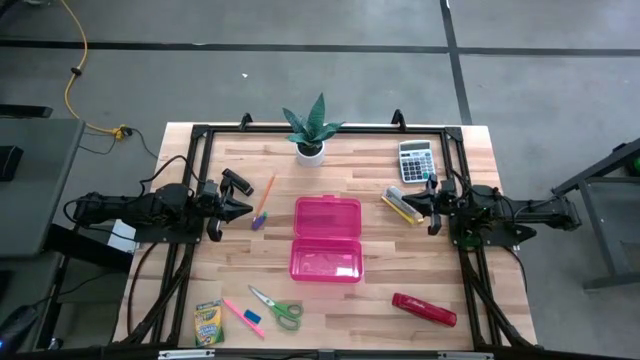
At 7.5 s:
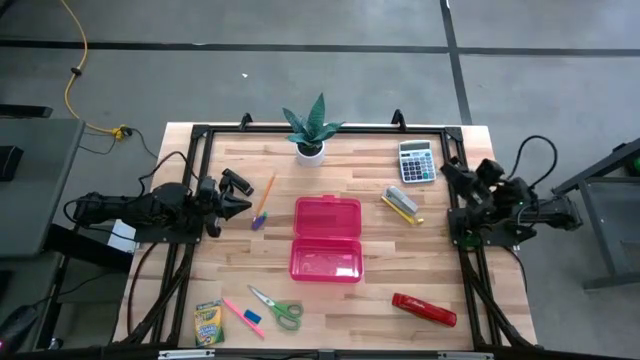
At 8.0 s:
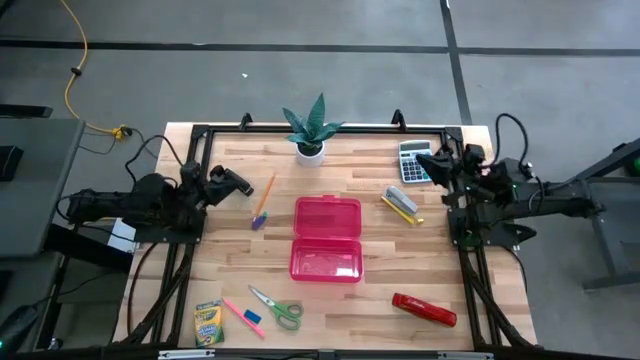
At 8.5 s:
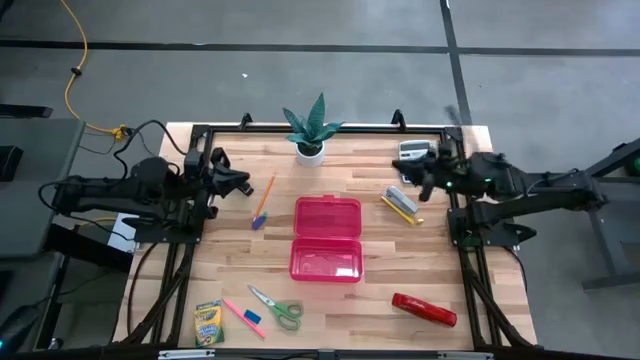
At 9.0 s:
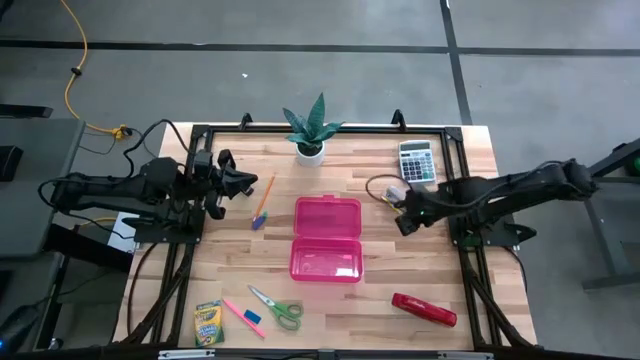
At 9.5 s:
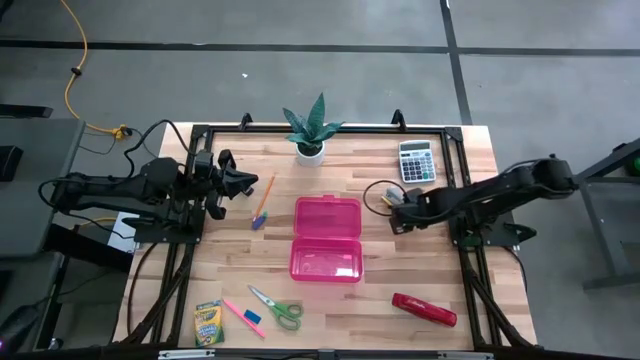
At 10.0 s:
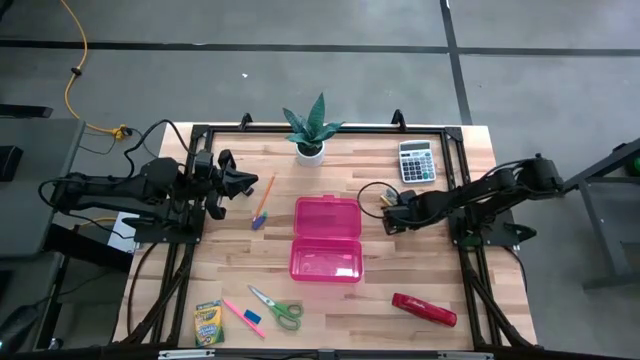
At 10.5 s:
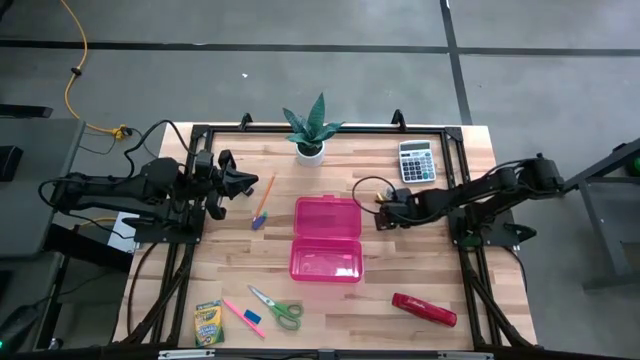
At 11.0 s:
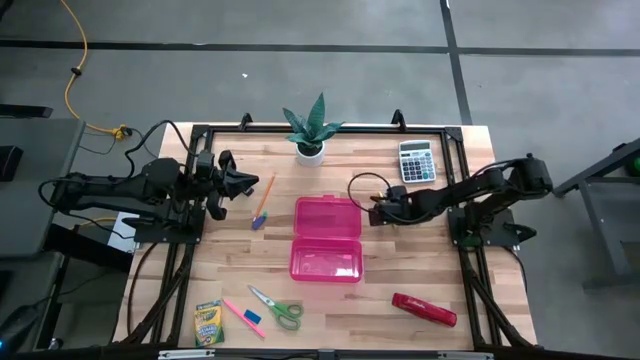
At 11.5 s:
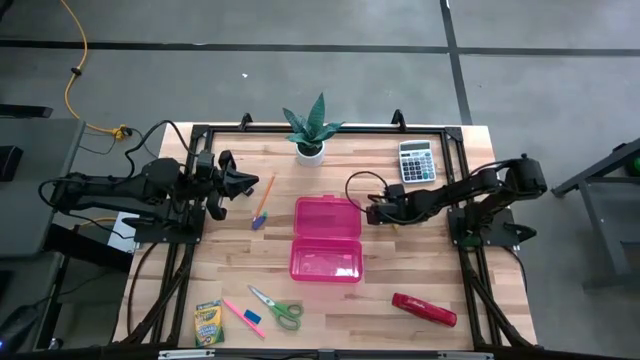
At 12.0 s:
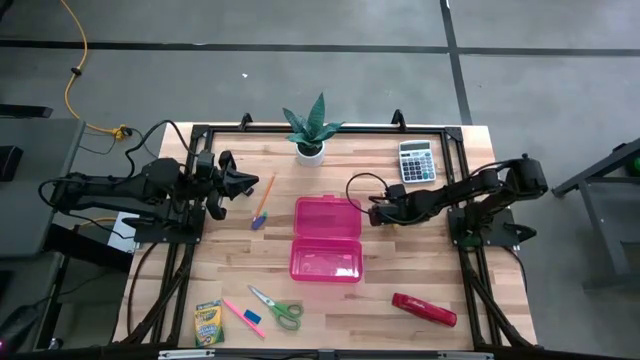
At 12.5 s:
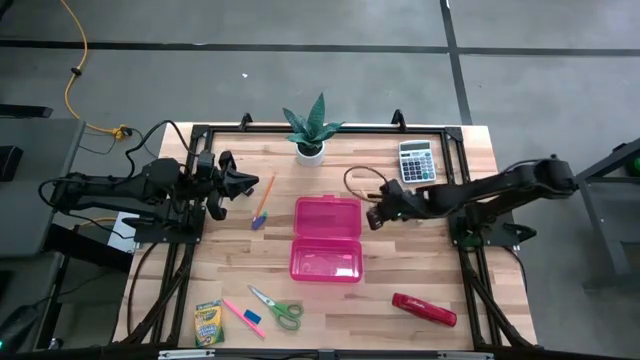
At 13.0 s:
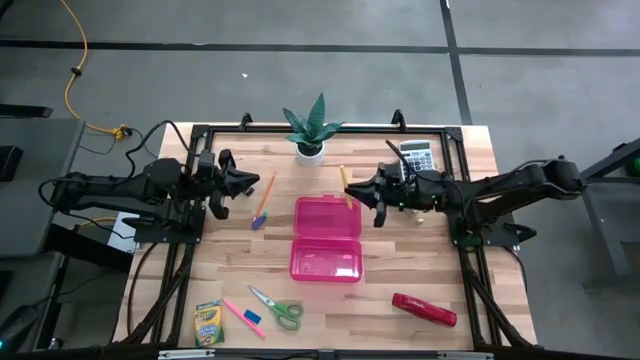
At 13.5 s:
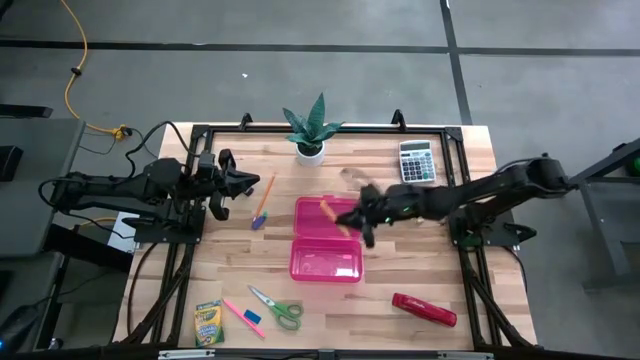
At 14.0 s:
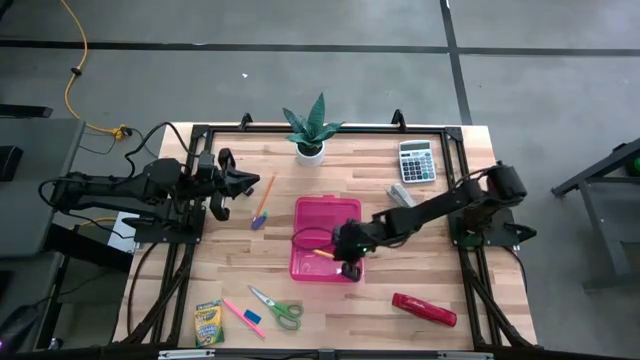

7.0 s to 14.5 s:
Task: Pack school essentials
Put the yellow pen into the red supply box

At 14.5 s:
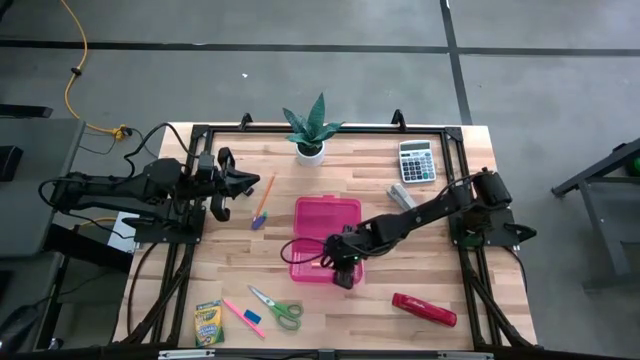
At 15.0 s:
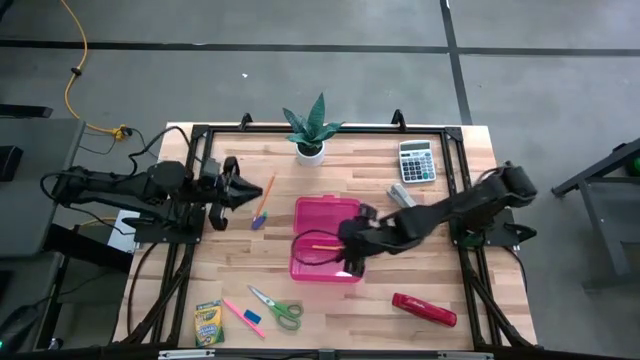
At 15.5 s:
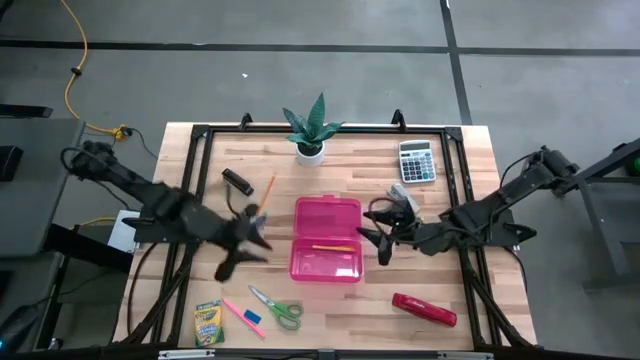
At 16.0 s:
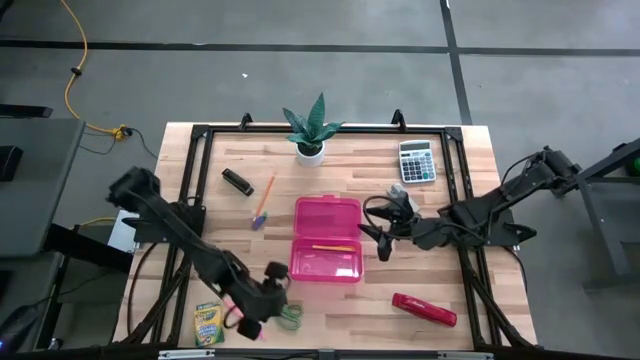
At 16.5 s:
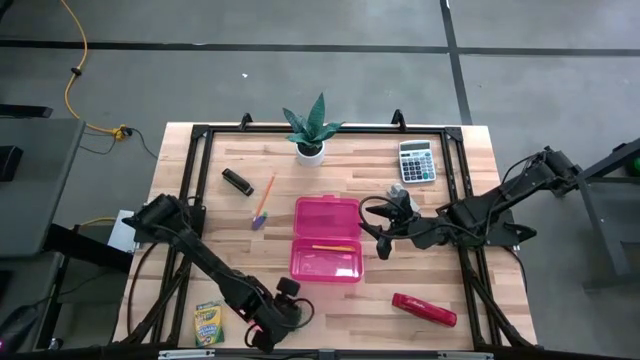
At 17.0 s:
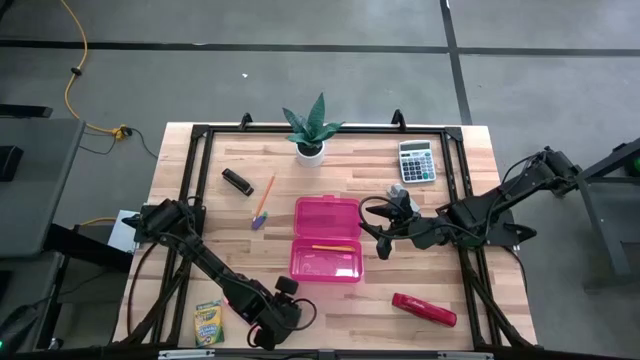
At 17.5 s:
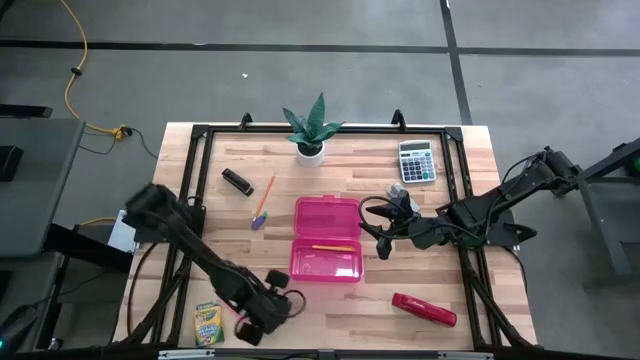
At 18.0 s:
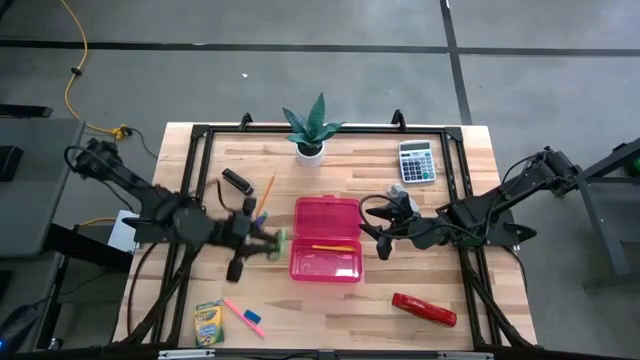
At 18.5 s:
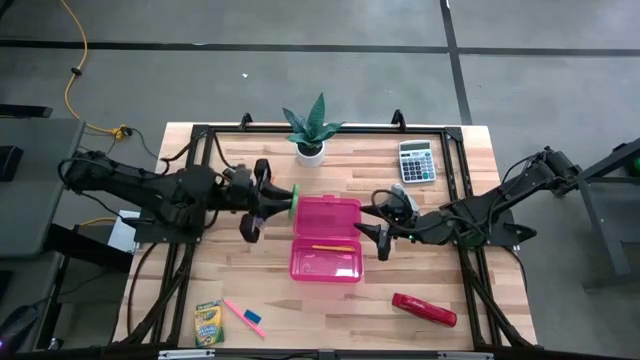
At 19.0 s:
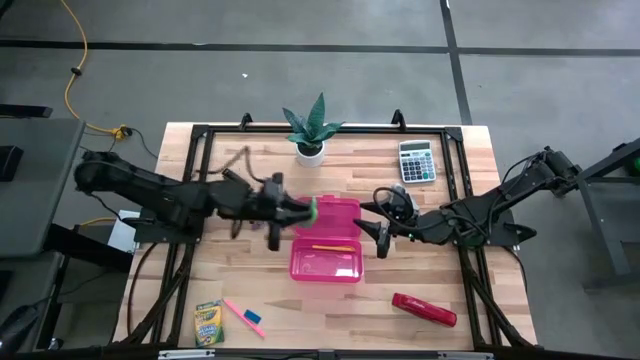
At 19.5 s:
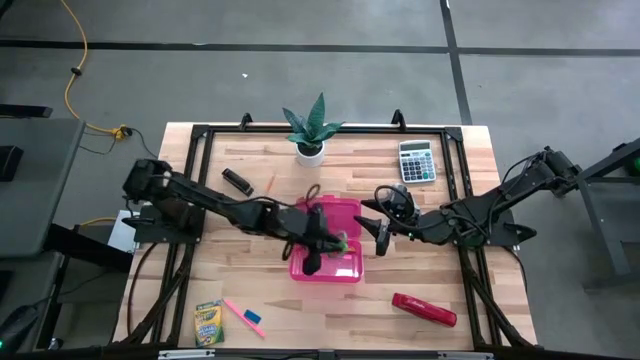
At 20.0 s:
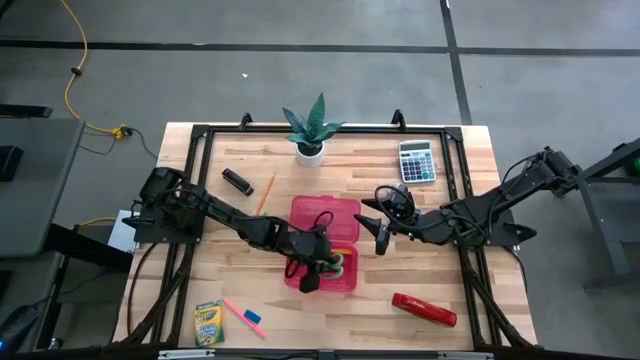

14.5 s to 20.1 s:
Put the green scissors into the red supply box

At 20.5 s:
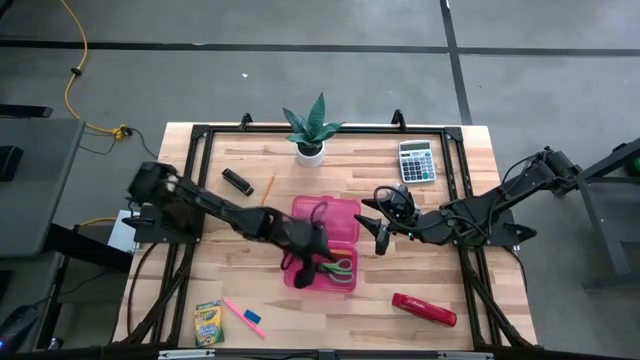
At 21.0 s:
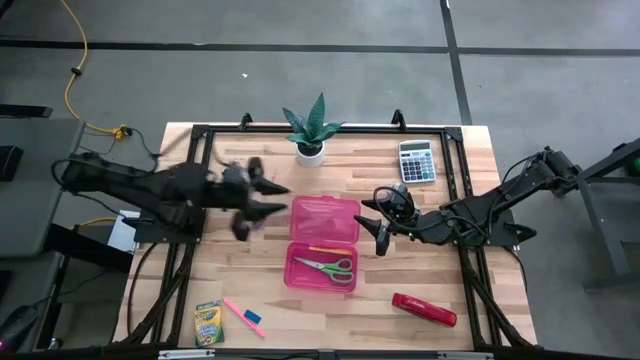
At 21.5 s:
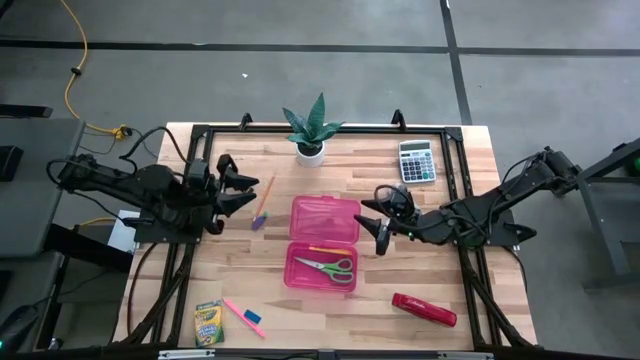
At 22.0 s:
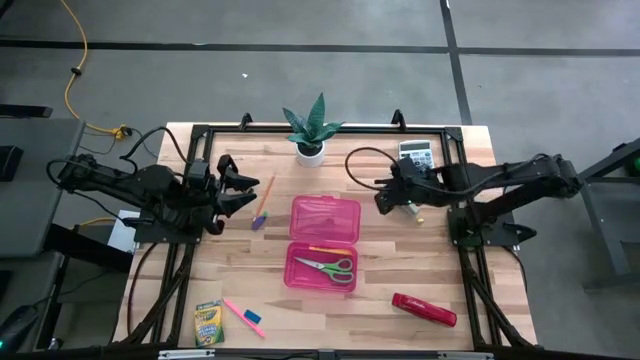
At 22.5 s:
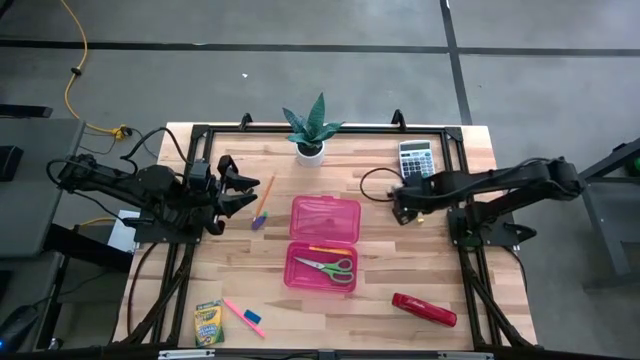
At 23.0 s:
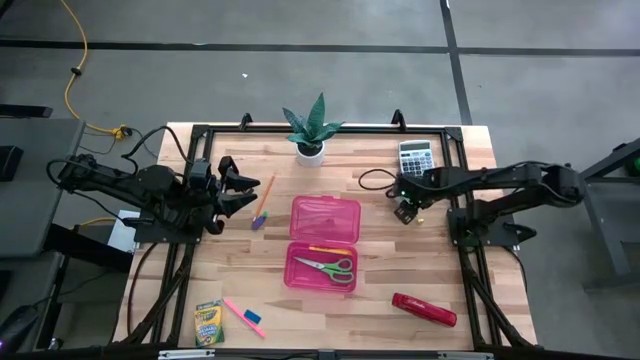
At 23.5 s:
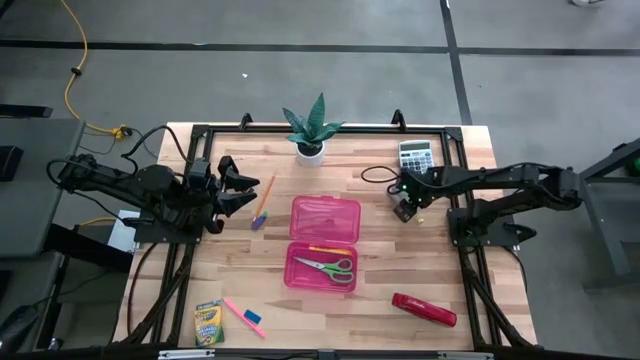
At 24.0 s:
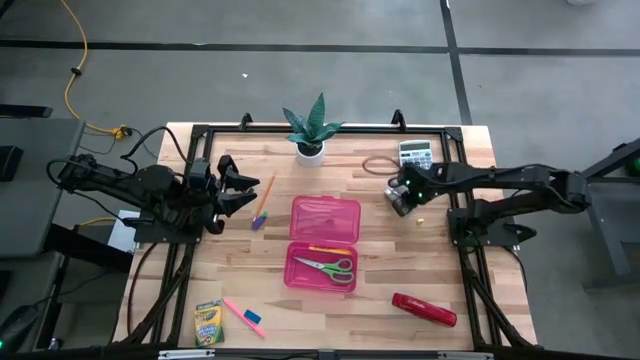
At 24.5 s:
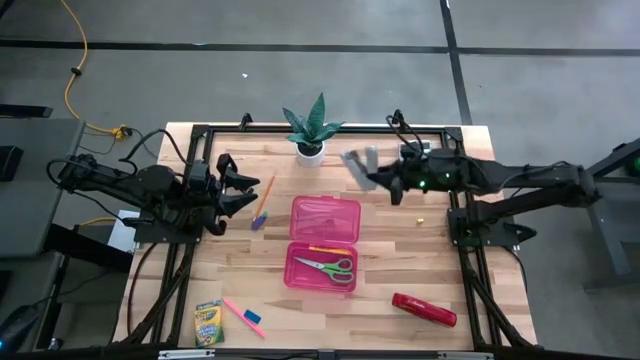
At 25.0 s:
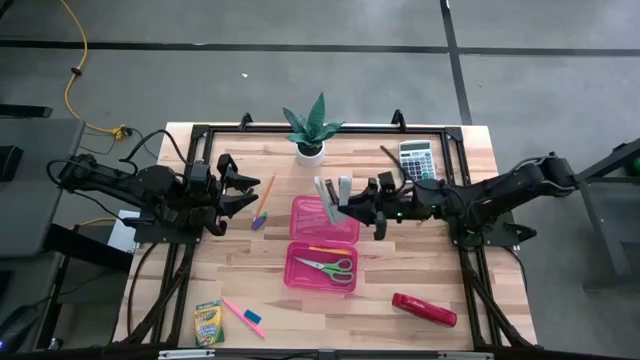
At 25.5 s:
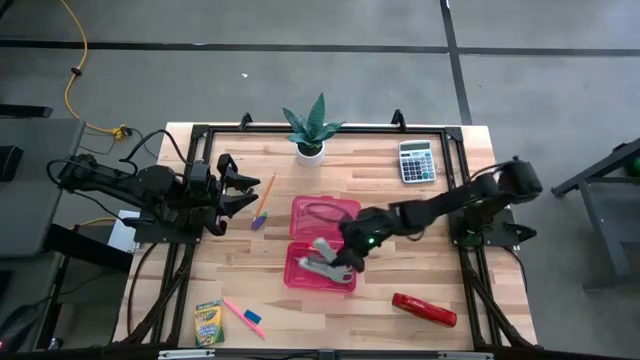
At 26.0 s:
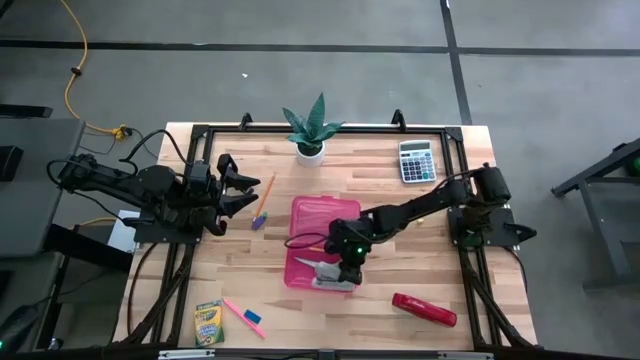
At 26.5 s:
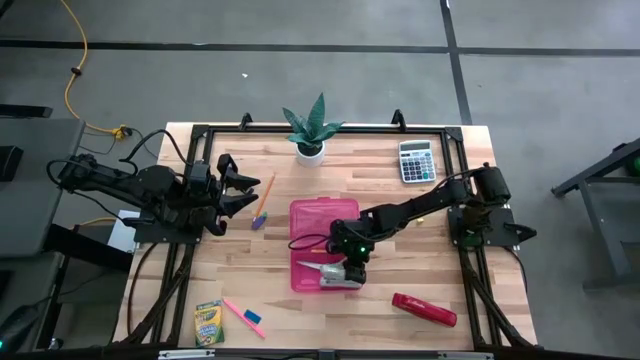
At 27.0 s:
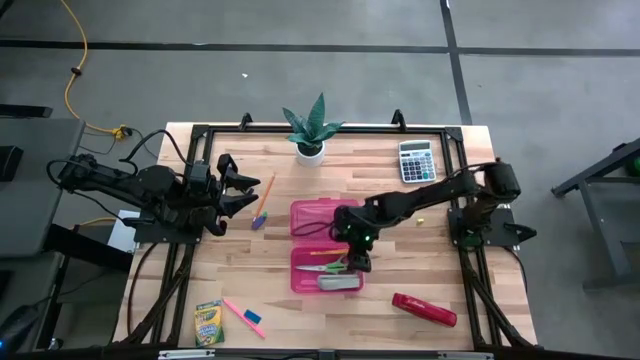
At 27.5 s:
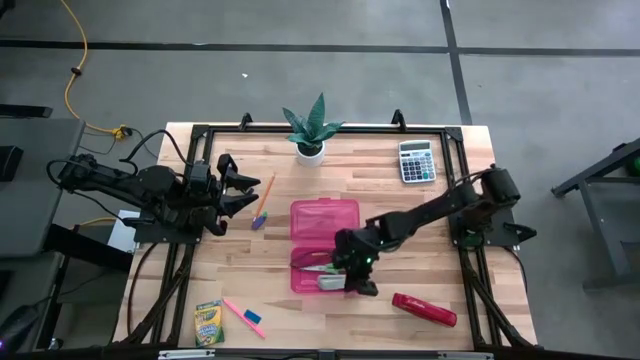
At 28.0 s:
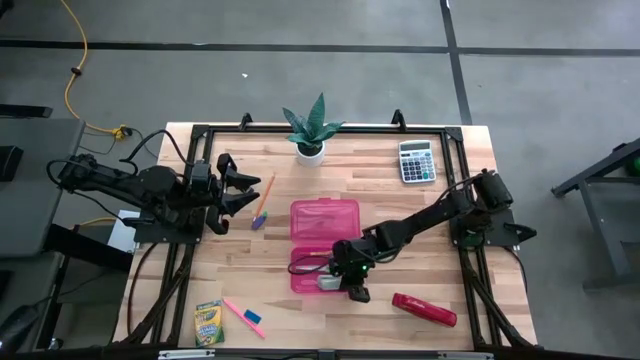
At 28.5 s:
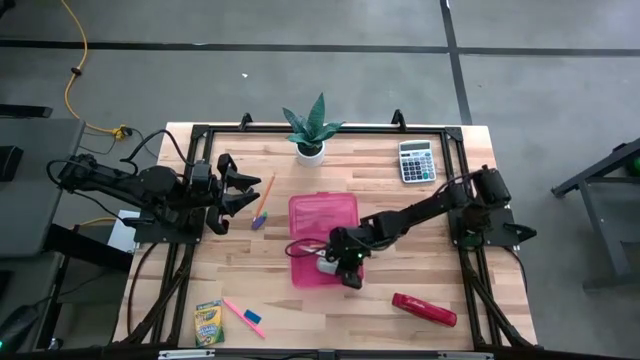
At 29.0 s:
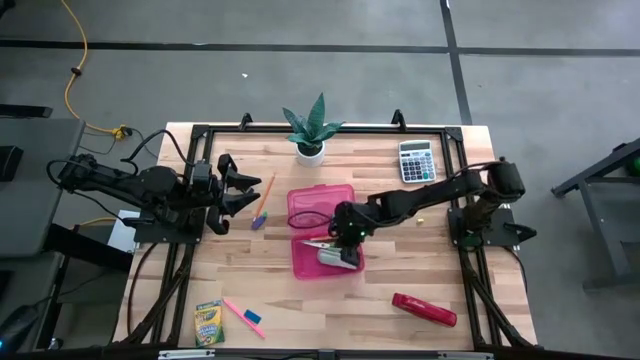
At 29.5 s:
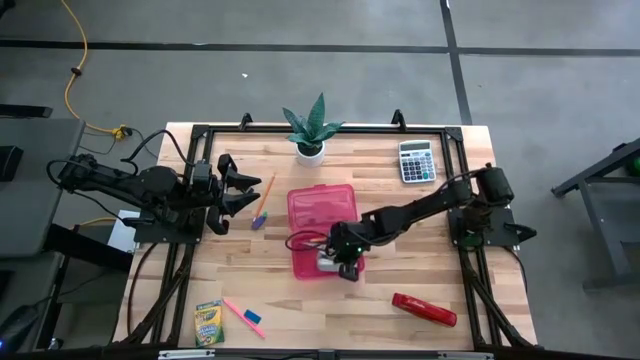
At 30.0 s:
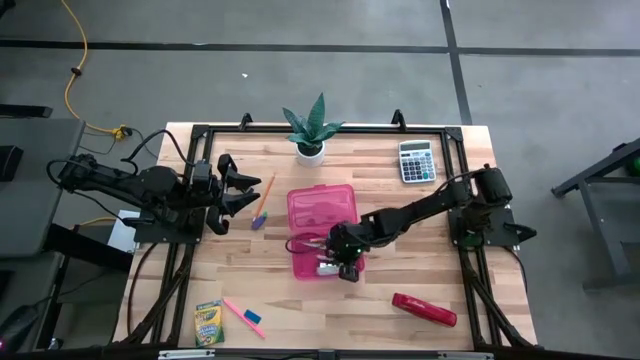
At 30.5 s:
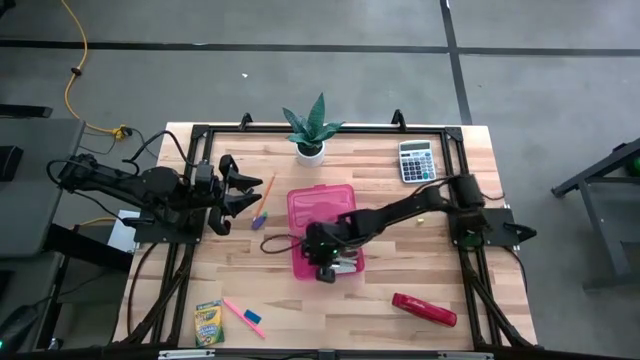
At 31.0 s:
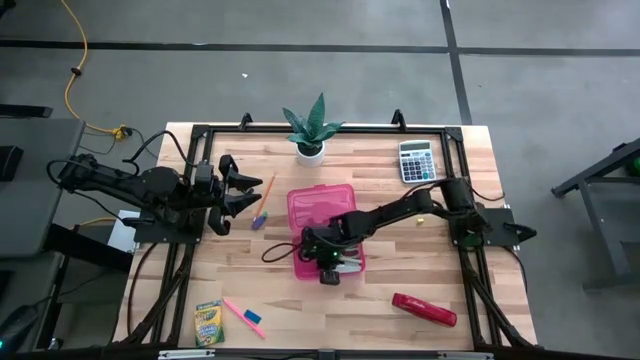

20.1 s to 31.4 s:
Put the gray stapler into the red supply box
